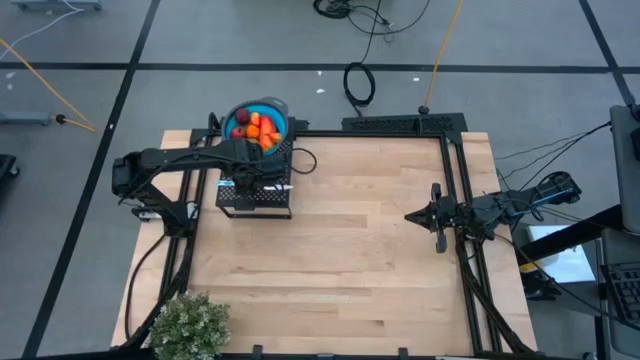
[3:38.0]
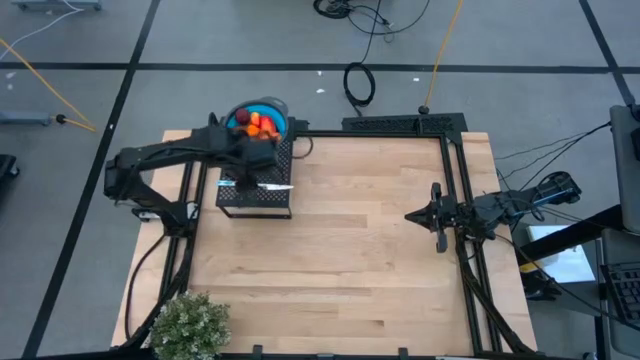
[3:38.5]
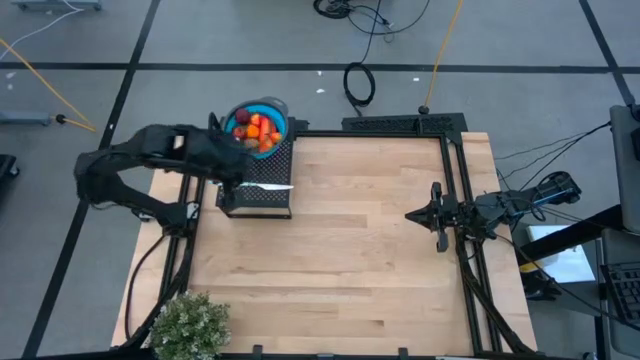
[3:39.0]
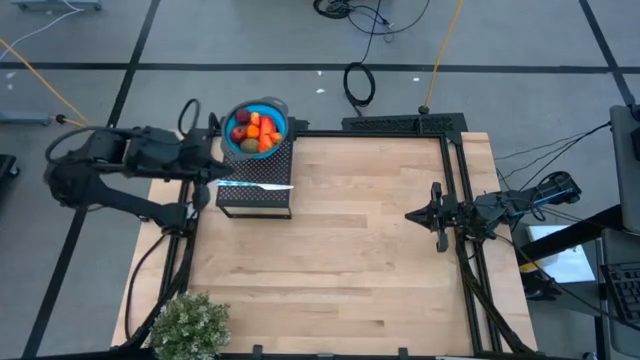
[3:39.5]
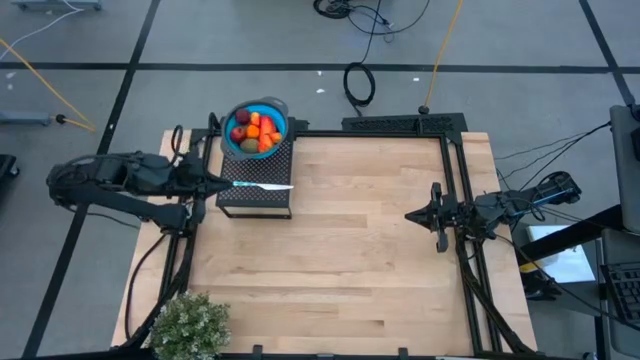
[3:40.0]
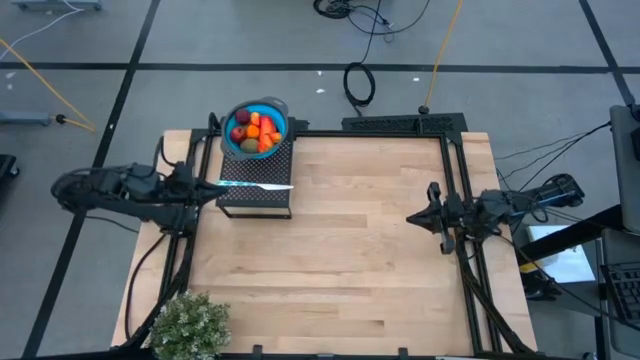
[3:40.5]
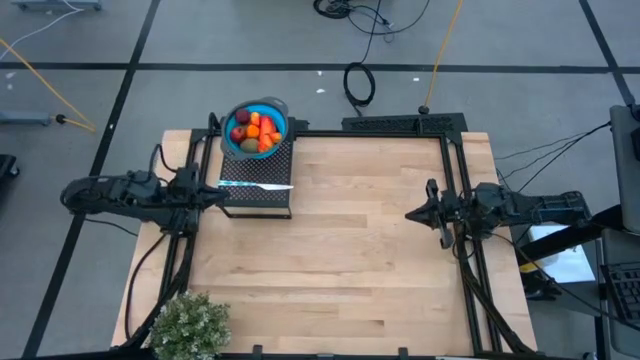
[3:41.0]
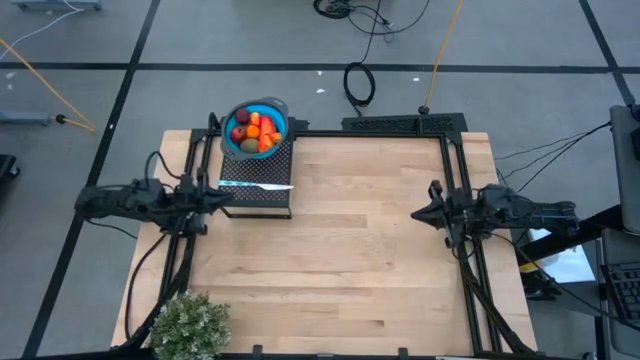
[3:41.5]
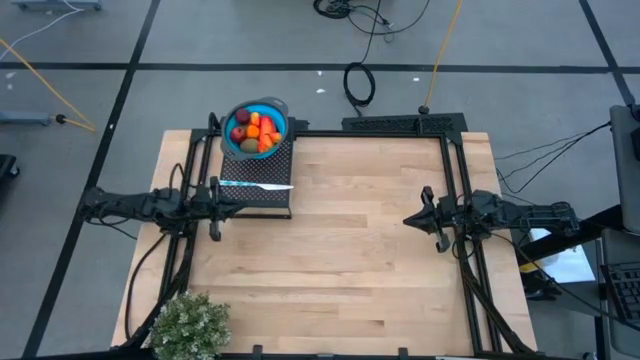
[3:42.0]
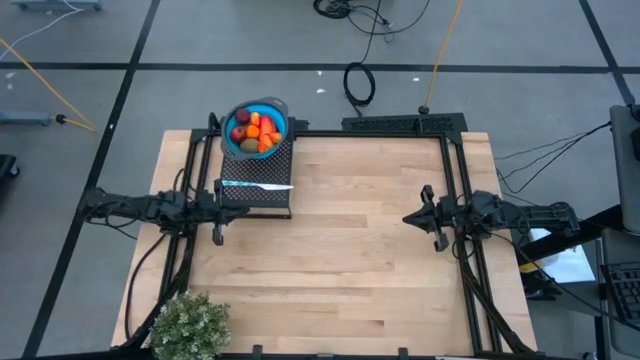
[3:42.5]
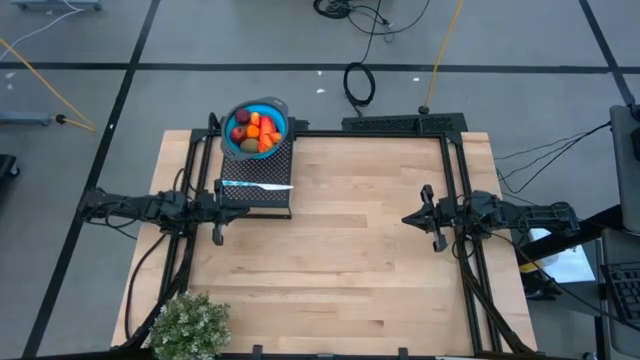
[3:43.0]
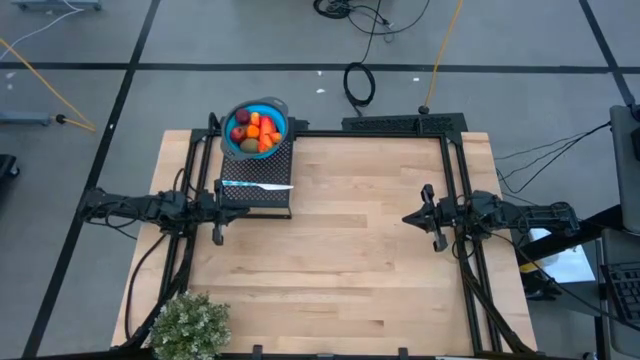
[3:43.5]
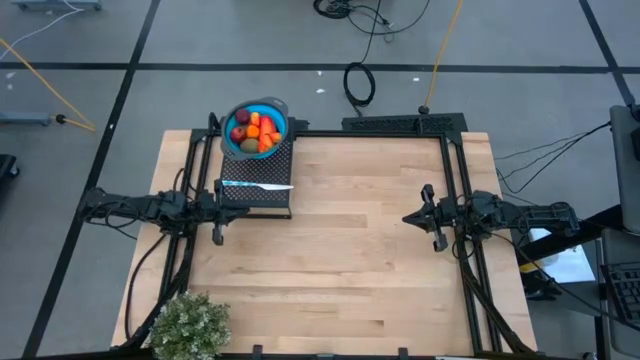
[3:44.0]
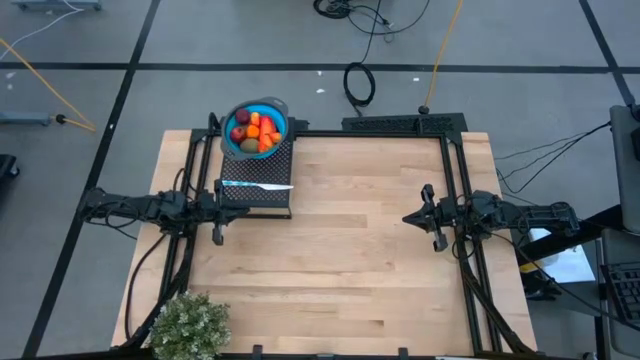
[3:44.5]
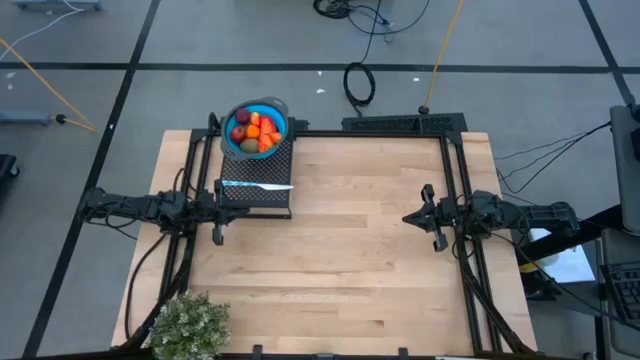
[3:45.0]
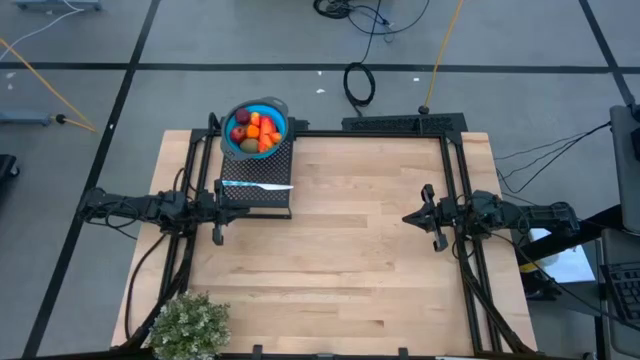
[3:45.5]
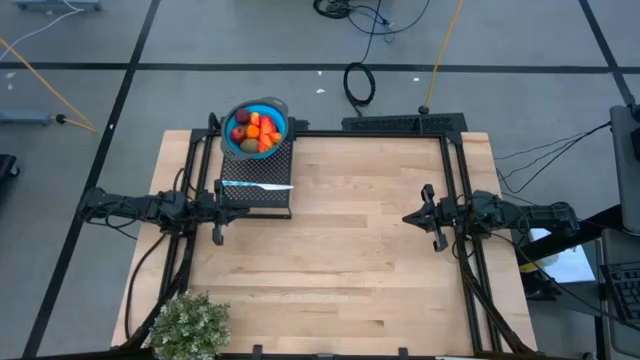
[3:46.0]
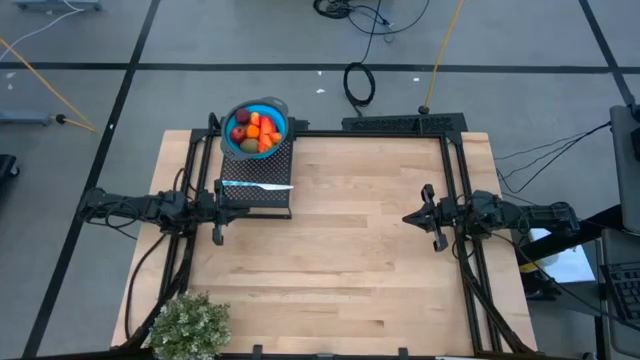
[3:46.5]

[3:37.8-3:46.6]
Task: Pick & Place Fruit
Return to Home Position

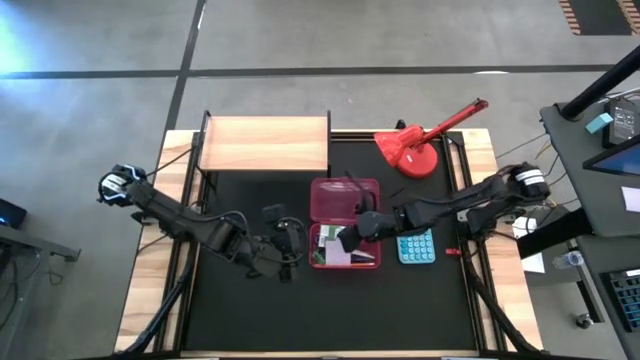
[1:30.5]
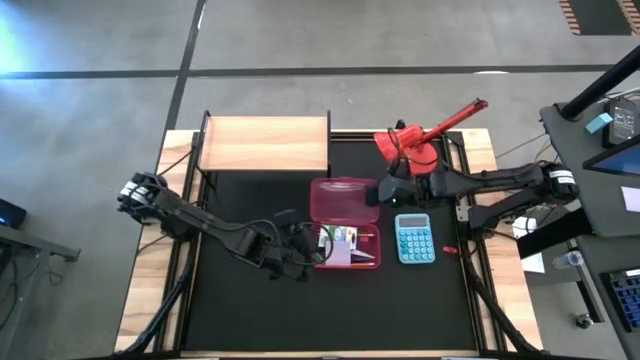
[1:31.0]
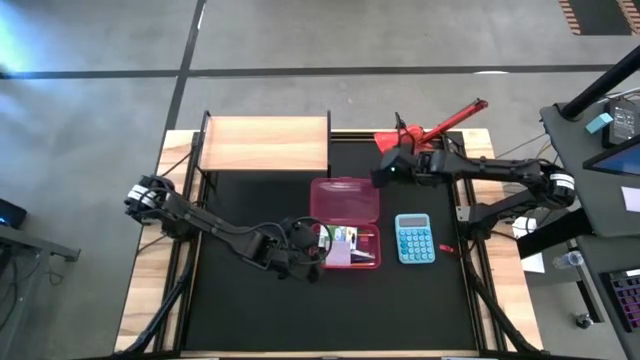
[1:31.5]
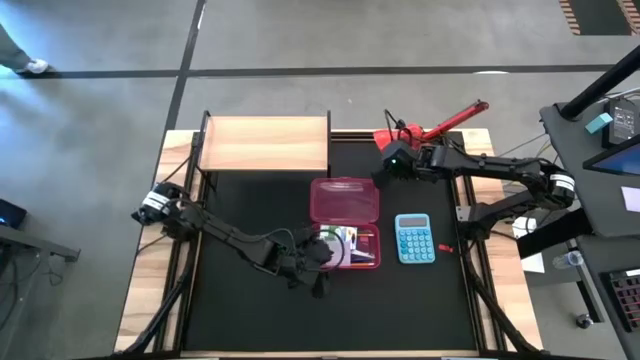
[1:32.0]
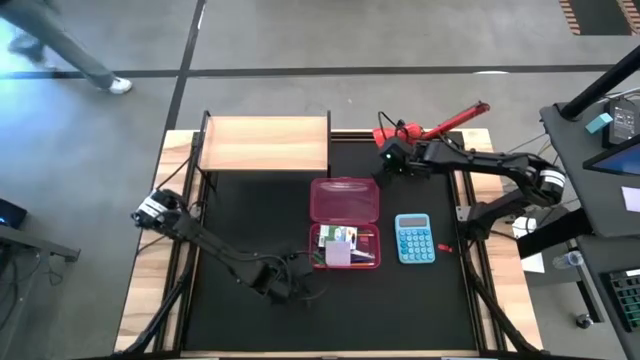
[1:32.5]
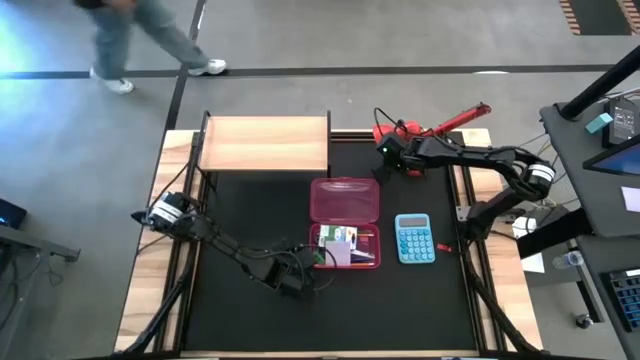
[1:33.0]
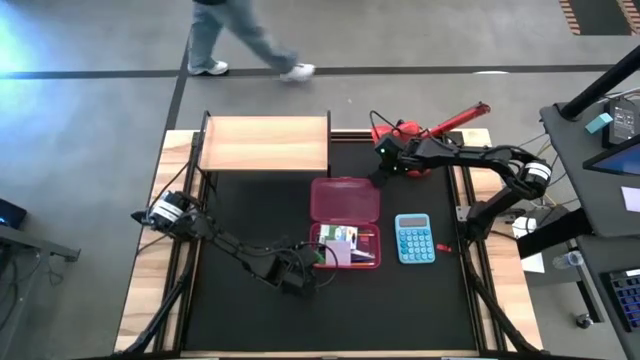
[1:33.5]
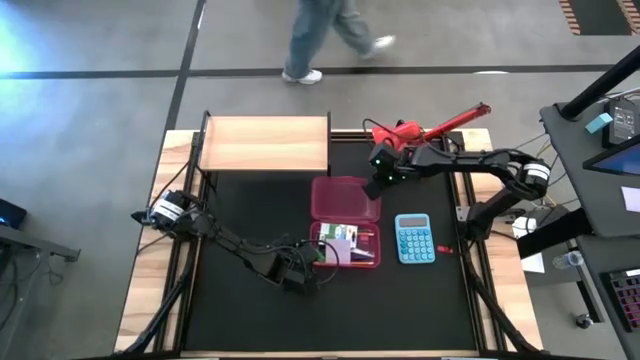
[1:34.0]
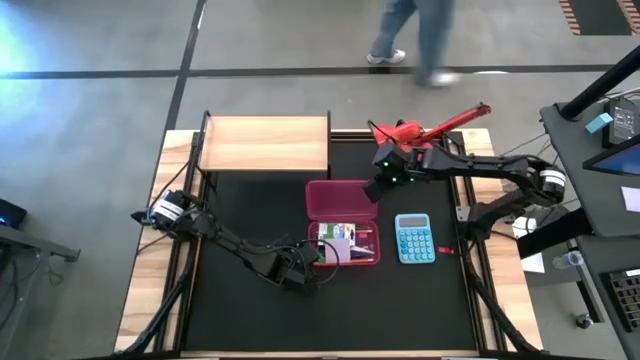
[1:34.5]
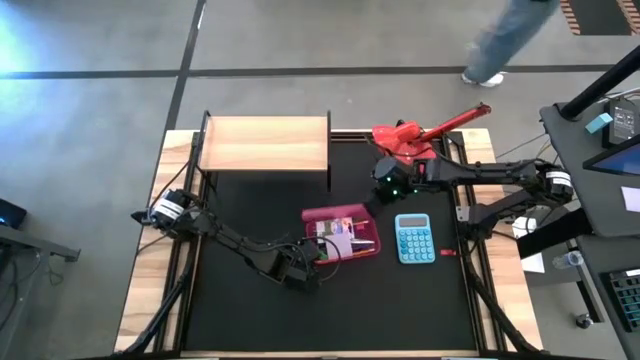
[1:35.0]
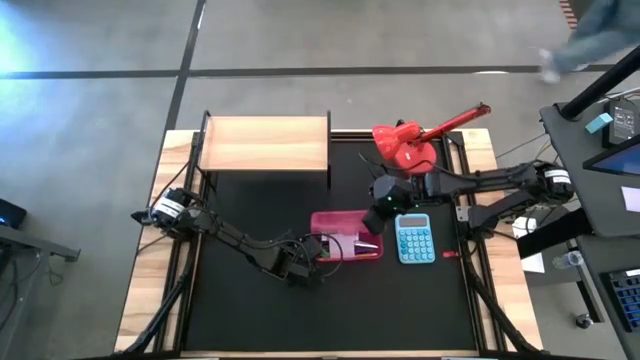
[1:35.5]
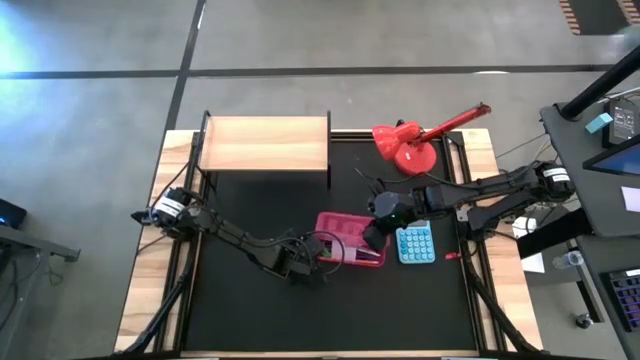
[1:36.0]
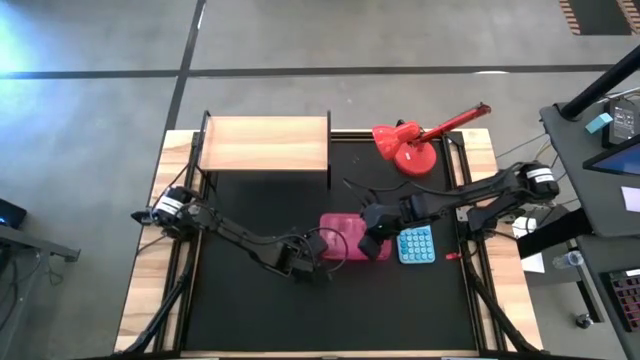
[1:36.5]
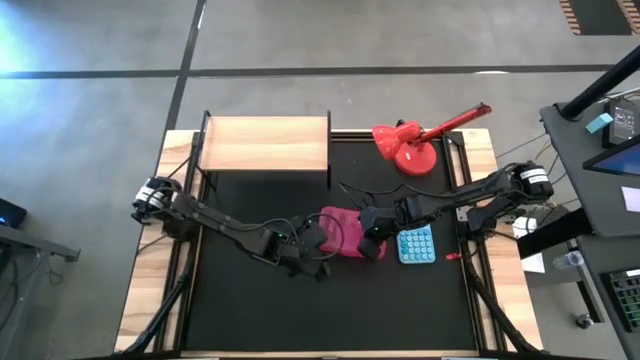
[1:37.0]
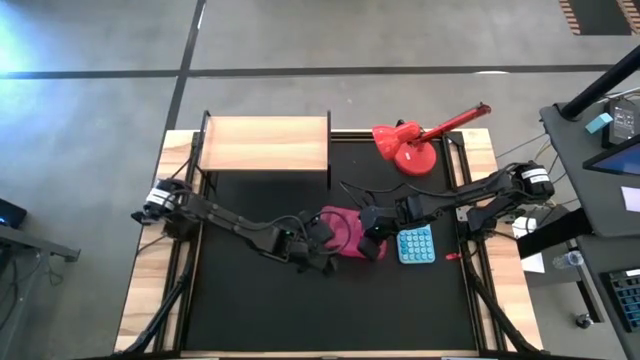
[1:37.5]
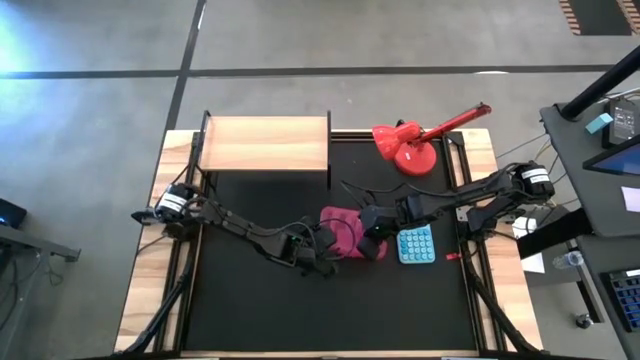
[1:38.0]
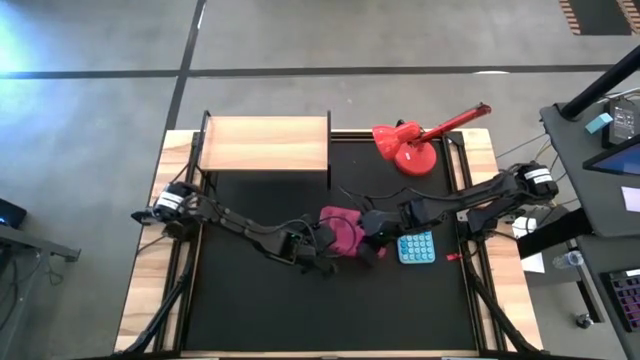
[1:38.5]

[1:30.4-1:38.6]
Task: Pack school essentials
Close the pink supply box
